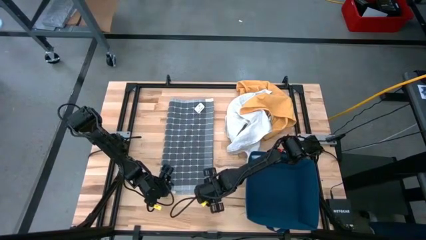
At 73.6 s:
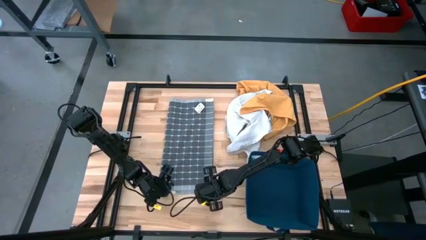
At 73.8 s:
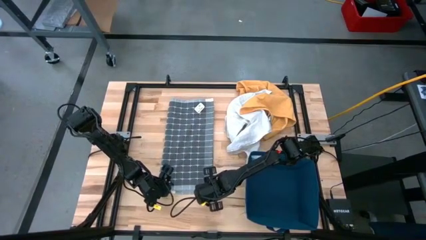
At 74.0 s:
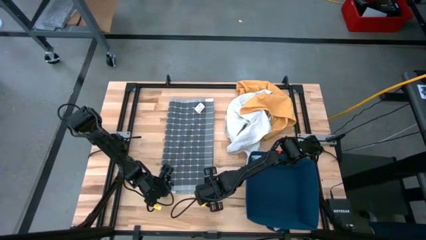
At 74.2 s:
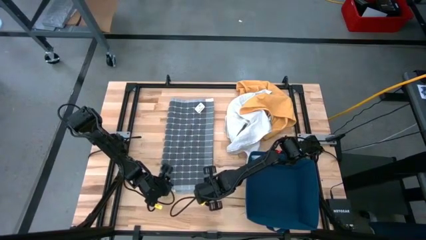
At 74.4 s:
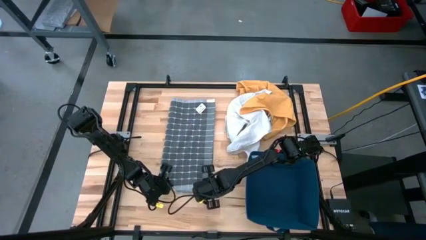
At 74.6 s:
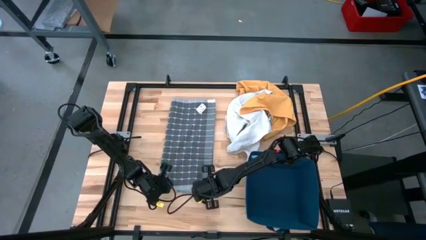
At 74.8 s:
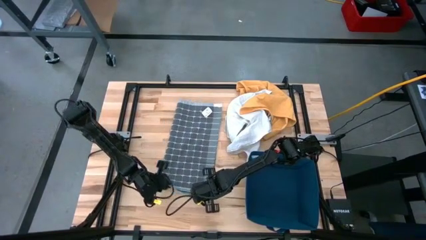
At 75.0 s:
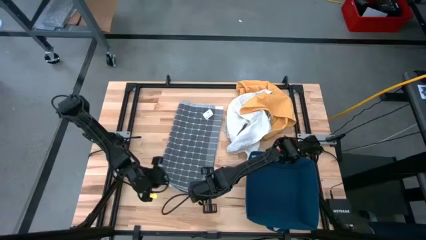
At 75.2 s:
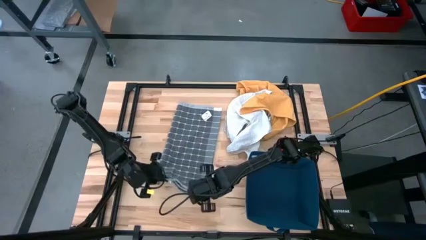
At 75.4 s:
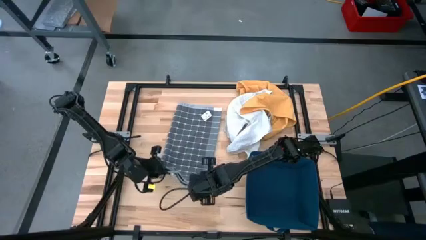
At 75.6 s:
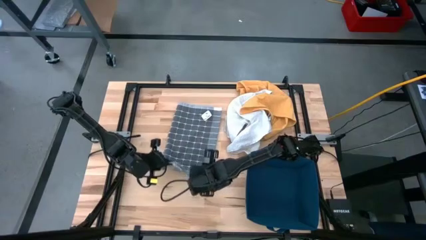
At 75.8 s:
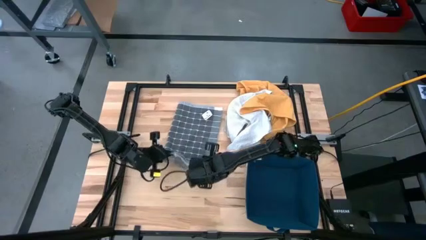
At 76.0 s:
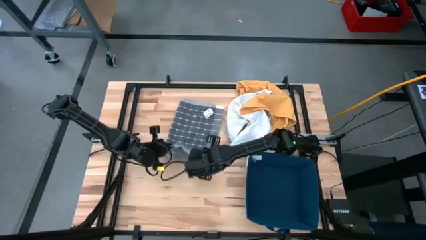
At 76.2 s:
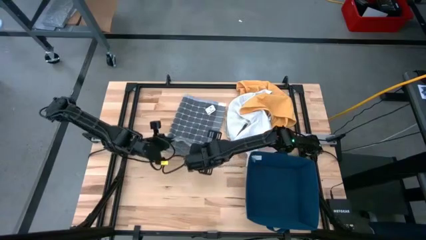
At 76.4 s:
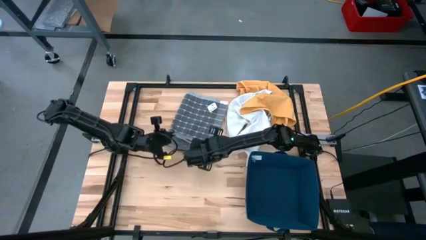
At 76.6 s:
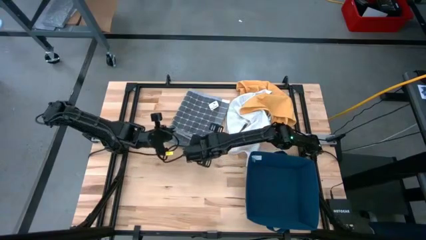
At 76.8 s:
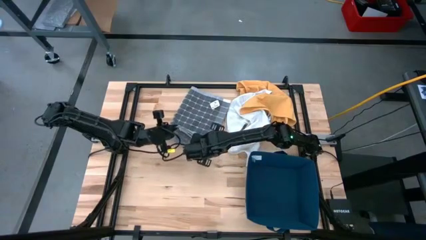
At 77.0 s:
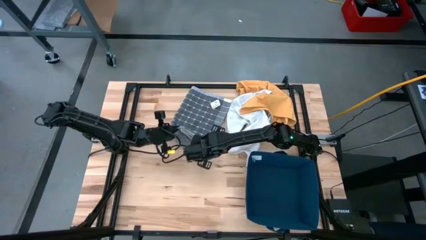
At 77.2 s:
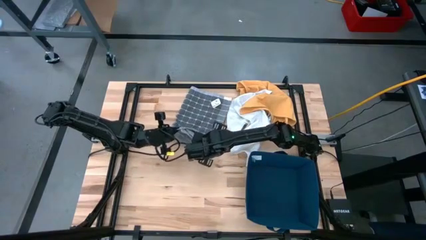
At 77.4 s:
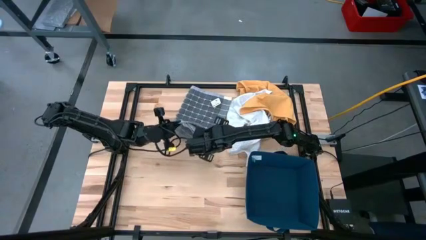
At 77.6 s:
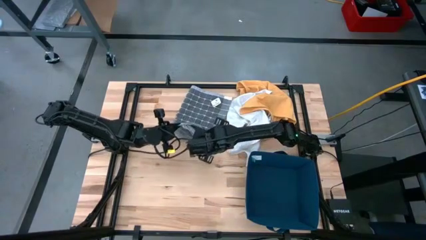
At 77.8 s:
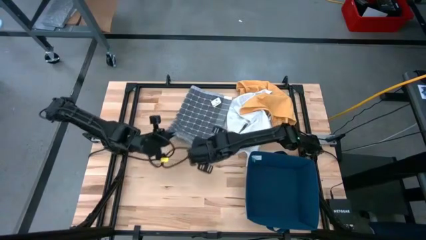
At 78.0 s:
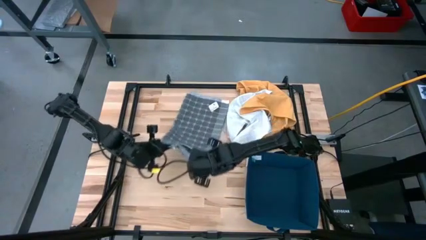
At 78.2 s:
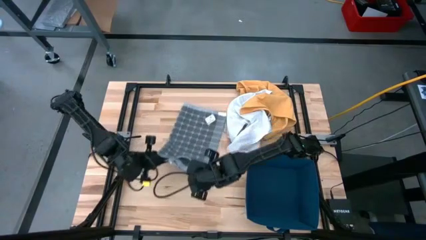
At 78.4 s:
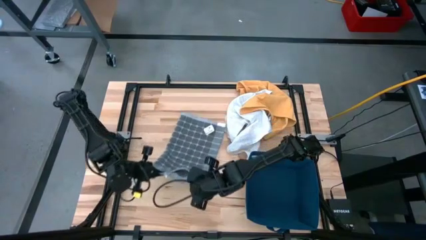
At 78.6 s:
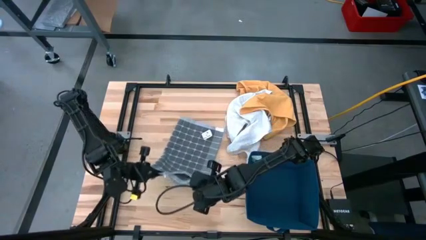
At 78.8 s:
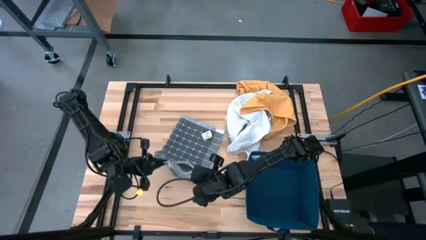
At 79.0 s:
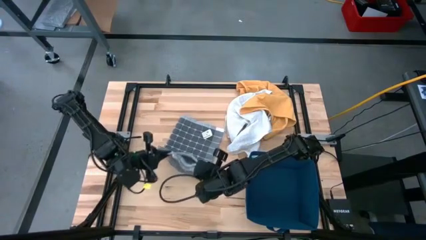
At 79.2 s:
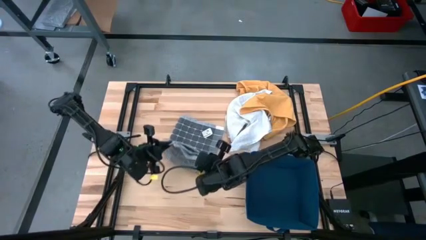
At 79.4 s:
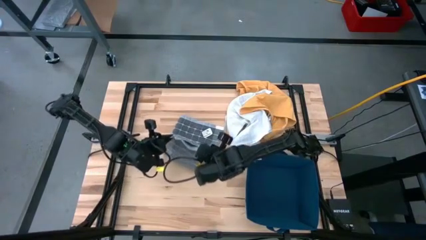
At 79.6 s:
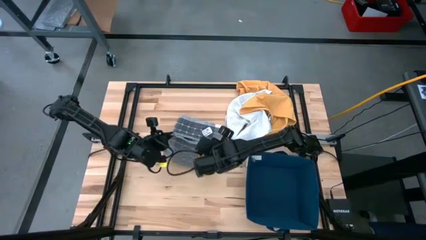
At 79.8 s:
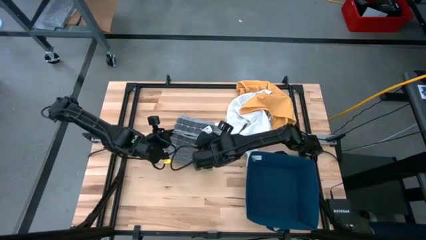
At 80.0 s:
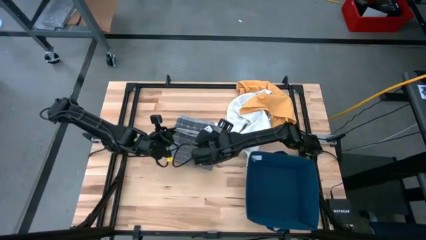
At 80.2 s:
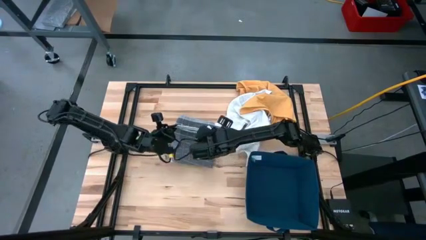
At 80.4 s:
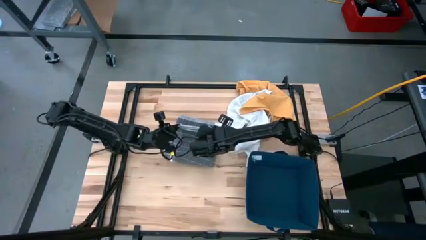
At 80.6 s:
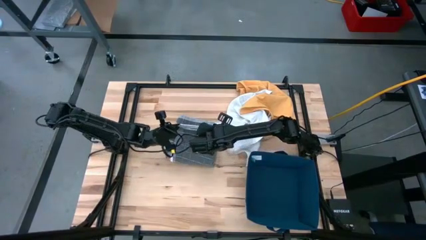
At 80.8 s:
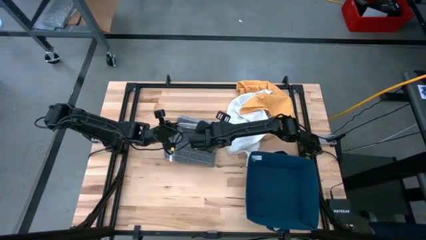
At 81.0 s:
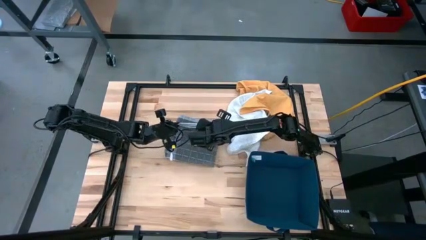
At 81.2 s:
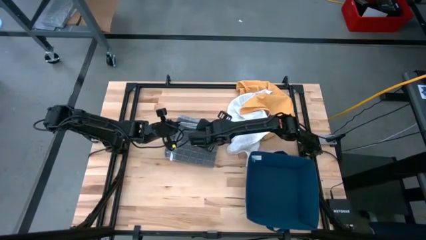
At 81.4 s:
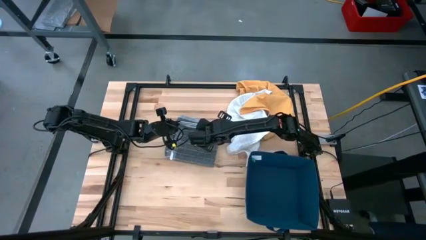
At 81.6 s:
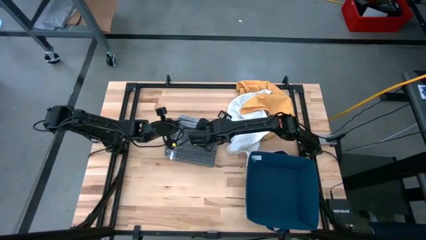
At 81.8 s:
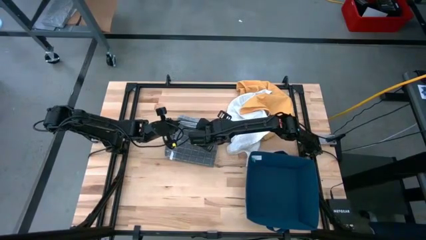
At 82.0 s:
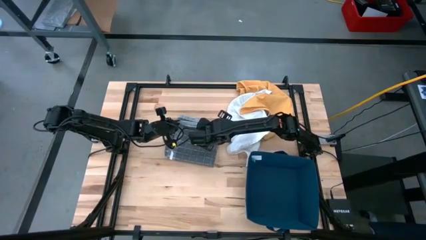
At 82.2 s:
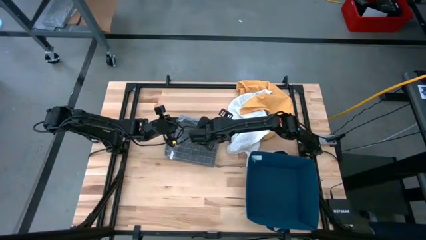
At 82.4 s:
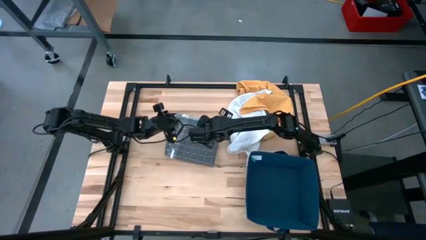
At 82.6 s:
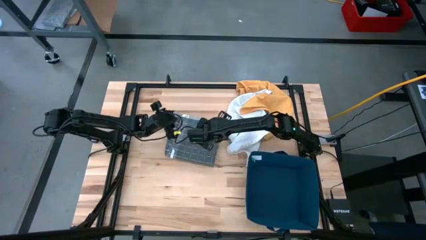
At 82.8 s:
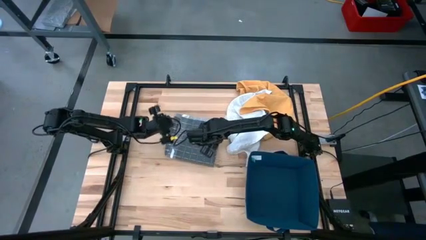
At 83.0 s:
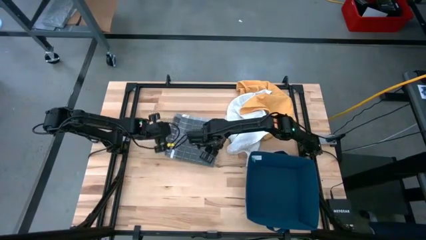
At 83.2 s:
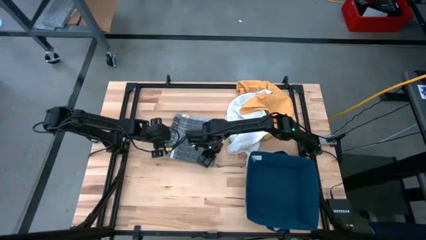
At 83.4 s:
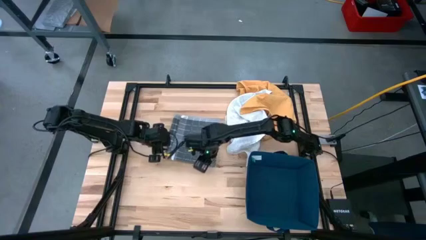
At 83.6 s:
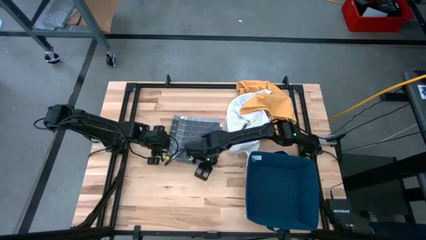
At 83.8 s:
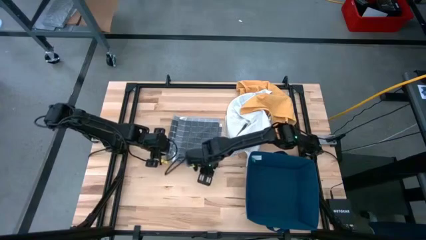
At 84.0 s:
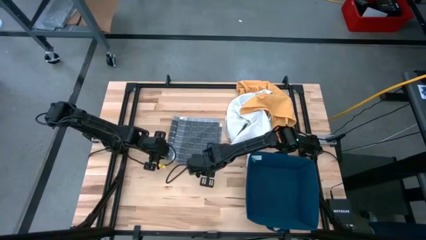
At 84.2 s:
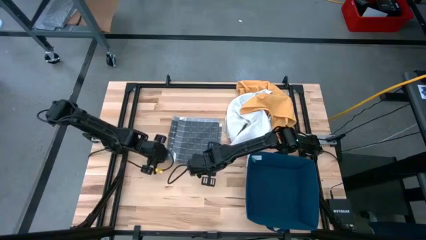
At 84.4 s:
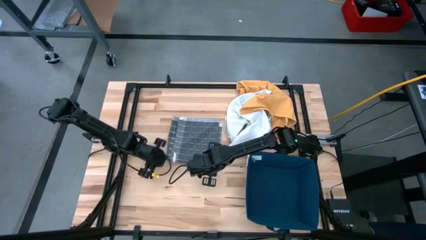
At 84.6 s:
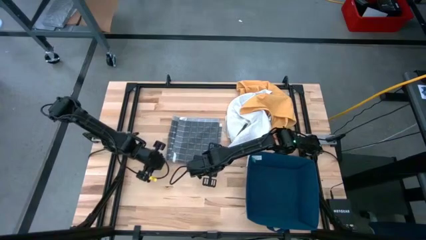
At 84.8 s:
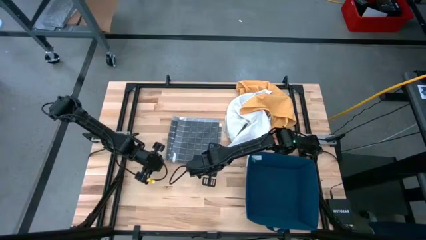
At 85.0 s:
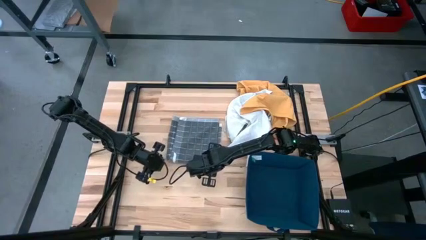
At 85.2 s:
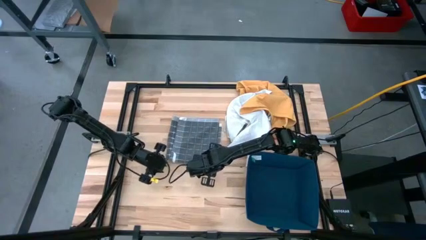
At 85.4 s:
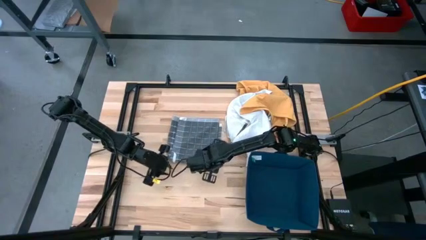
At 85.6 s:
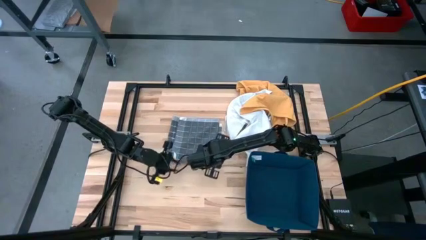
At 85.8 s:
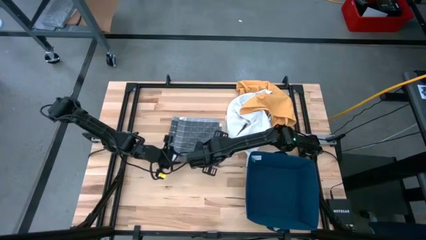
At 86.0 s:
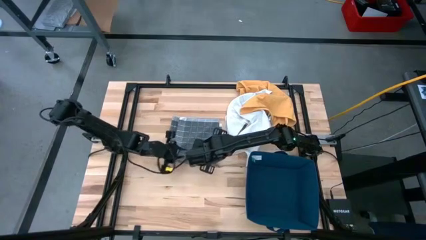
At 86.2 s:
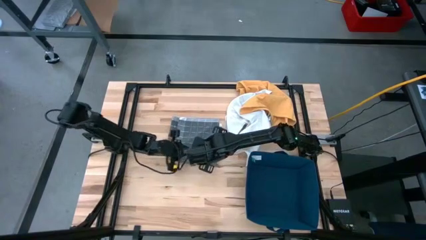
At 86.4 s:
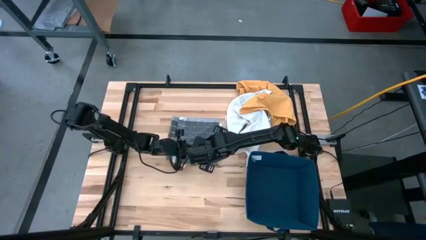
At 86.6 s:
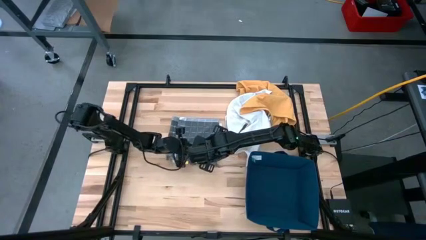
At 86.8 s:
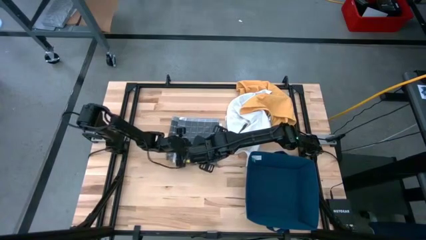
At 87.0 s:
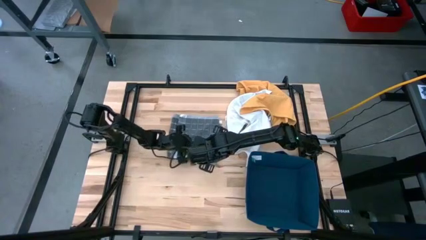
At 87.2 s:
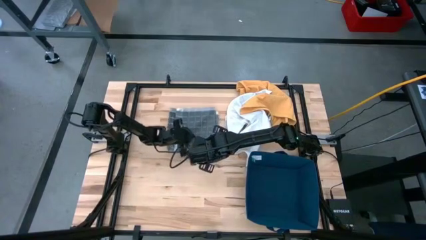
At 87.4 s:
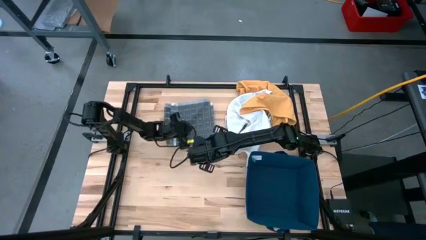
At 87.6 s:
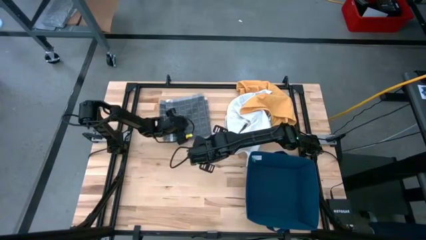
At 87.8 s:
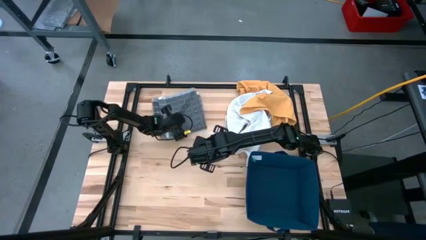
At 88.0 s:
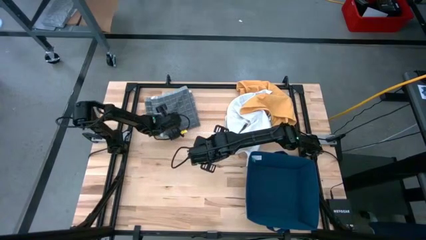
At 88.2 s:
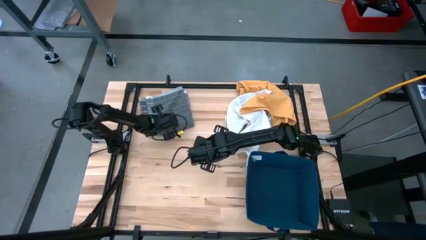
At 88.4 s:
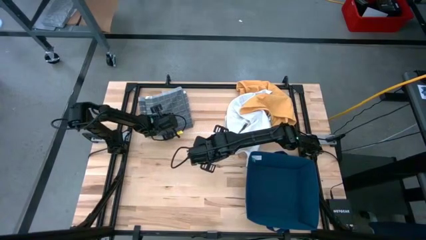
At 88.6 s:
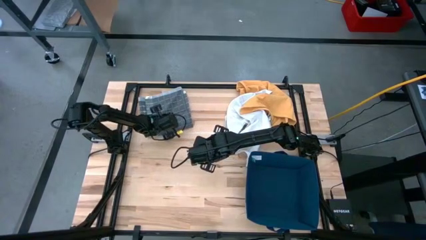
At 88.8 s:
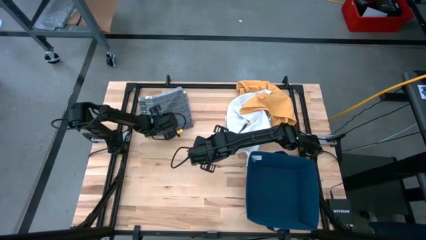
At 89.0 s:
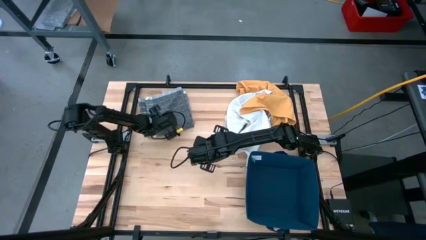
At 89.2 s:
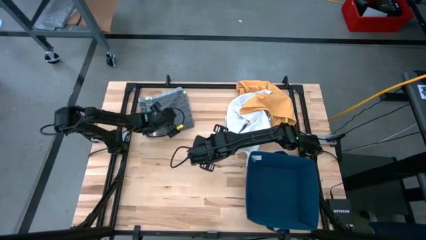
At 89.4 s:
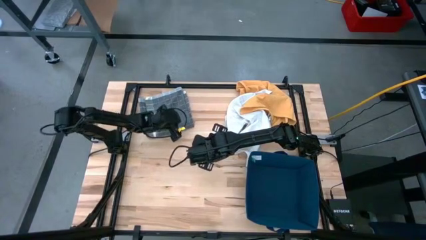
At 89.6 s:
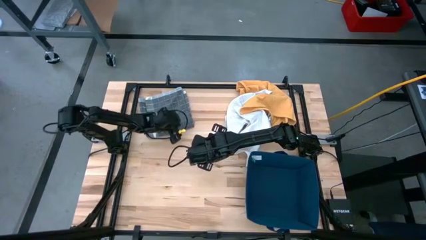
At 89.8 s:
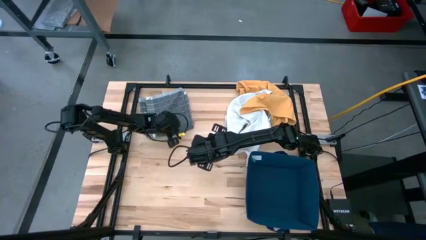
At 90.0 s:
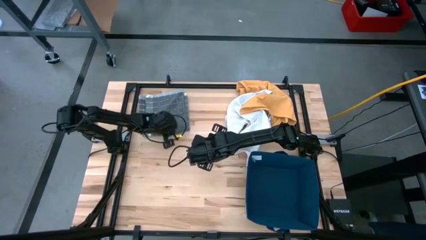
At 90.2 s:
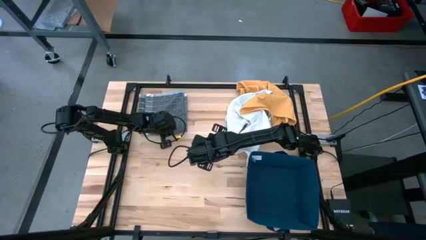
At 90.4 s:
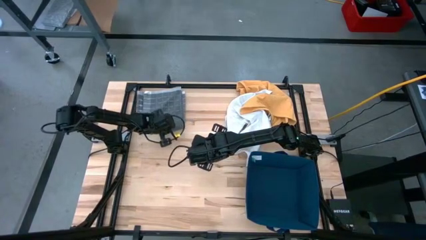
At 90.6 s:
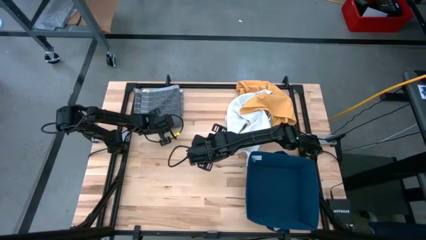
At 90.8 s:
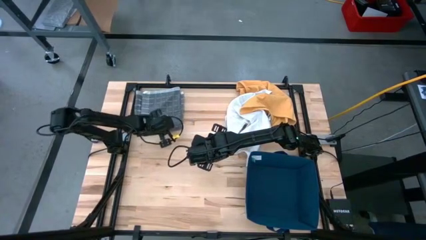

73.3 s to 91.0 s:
Task: Fold towel
Fold the gray towel
